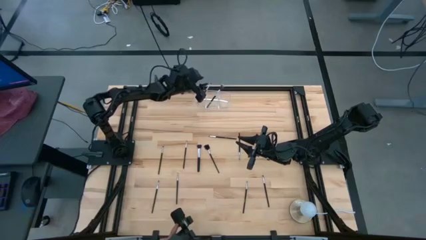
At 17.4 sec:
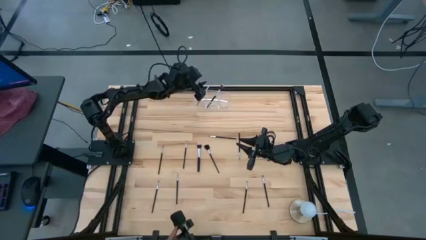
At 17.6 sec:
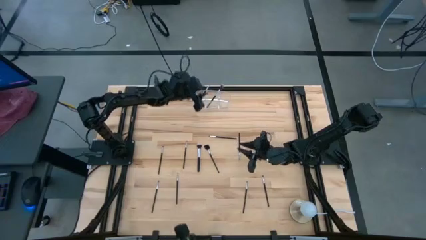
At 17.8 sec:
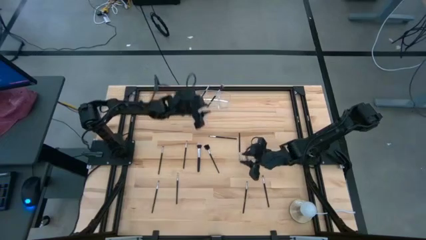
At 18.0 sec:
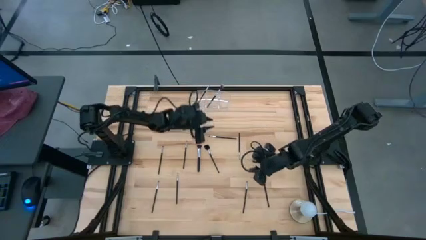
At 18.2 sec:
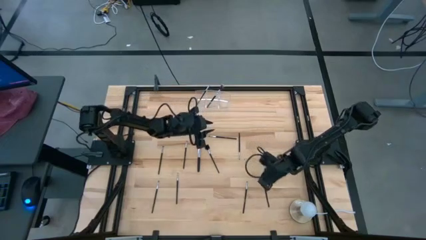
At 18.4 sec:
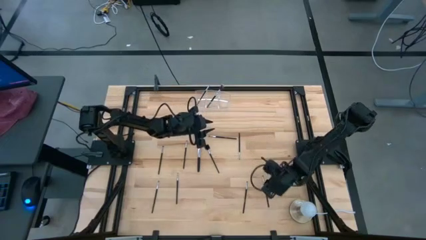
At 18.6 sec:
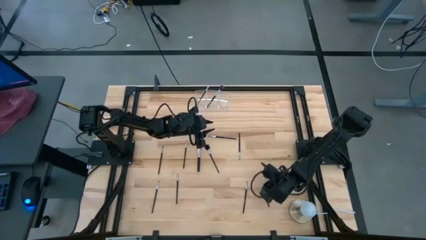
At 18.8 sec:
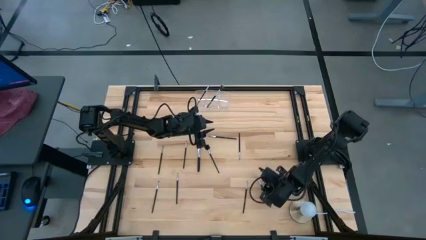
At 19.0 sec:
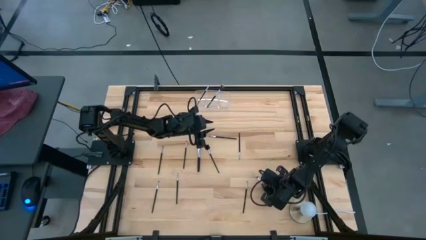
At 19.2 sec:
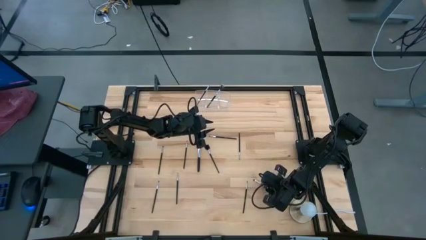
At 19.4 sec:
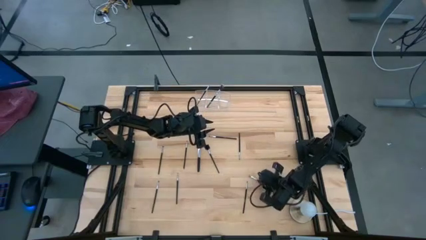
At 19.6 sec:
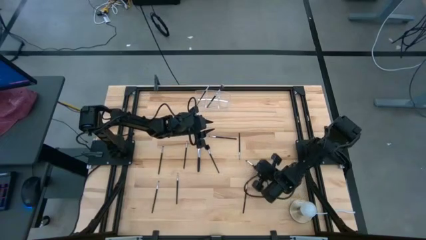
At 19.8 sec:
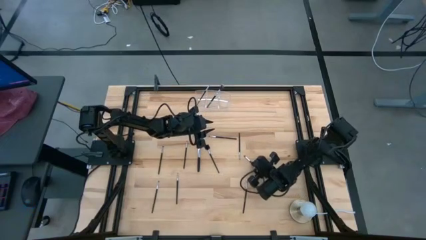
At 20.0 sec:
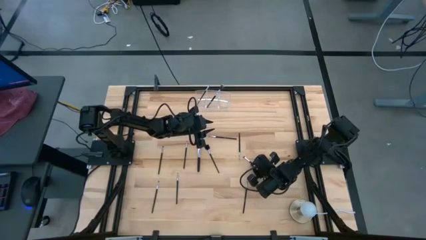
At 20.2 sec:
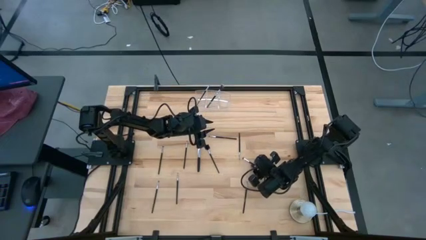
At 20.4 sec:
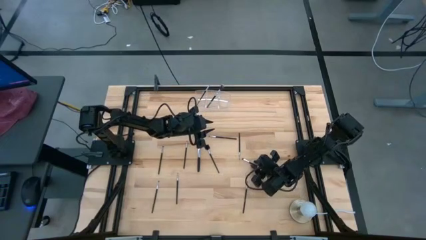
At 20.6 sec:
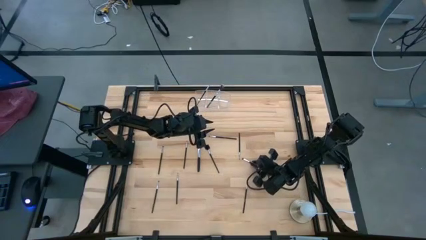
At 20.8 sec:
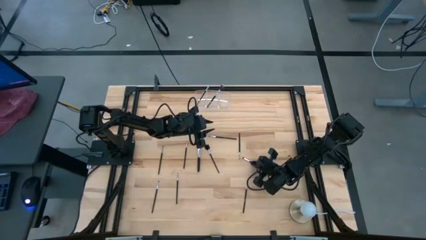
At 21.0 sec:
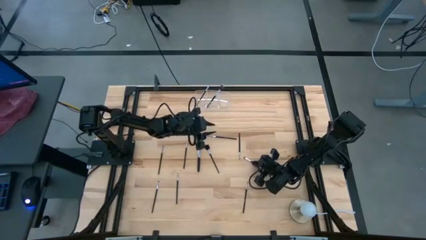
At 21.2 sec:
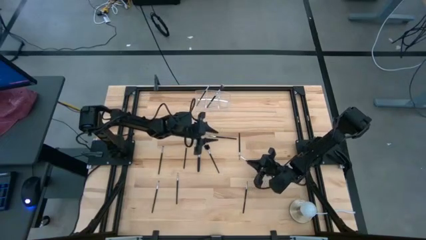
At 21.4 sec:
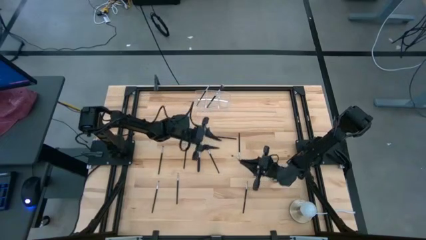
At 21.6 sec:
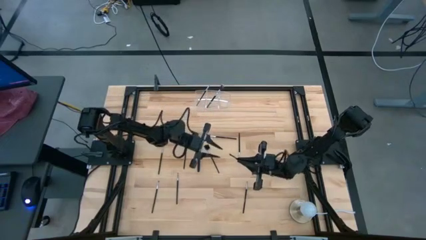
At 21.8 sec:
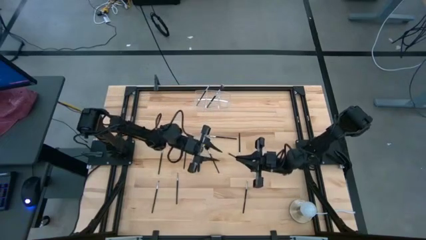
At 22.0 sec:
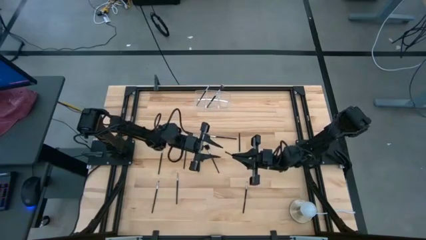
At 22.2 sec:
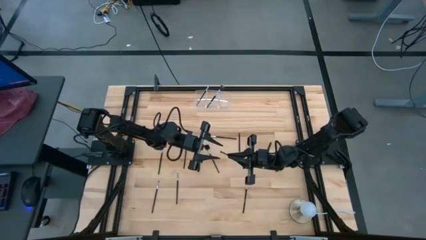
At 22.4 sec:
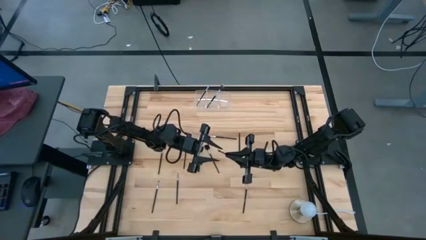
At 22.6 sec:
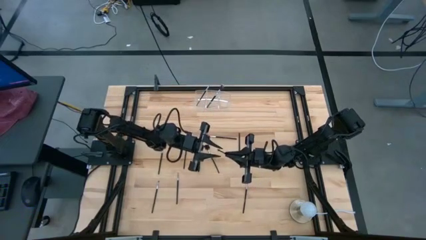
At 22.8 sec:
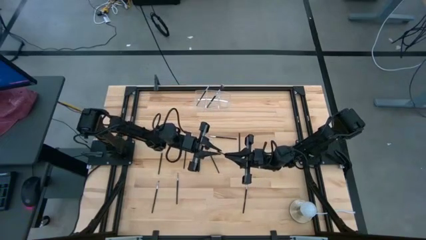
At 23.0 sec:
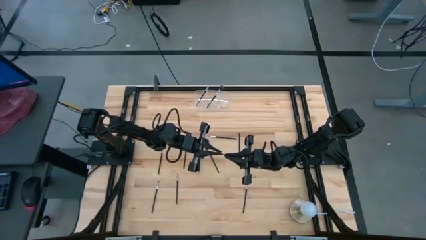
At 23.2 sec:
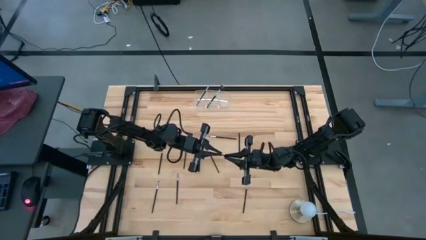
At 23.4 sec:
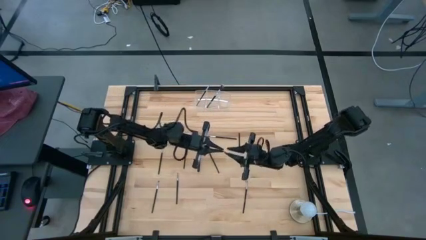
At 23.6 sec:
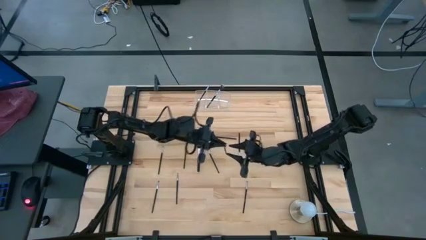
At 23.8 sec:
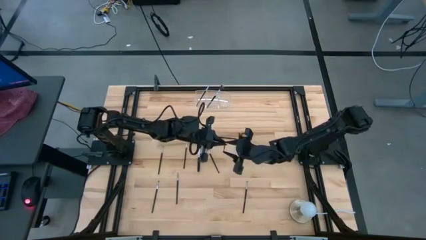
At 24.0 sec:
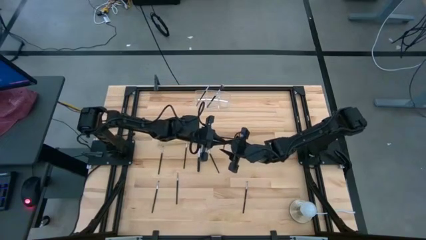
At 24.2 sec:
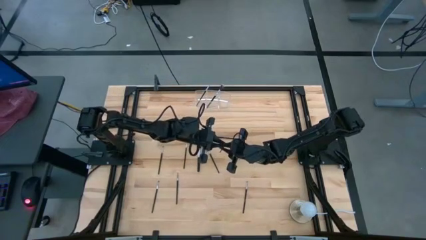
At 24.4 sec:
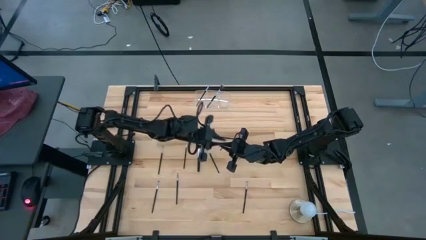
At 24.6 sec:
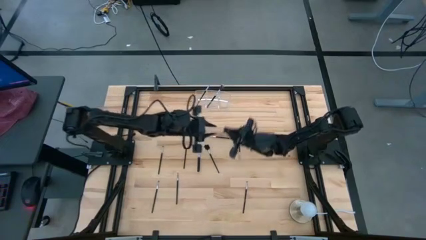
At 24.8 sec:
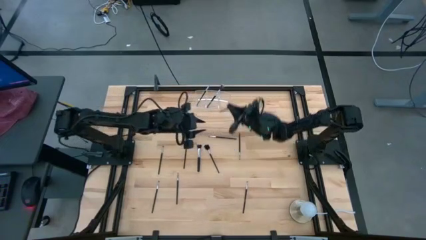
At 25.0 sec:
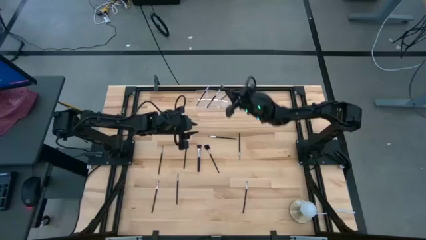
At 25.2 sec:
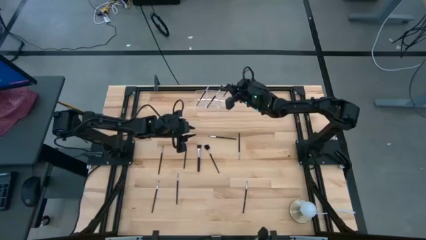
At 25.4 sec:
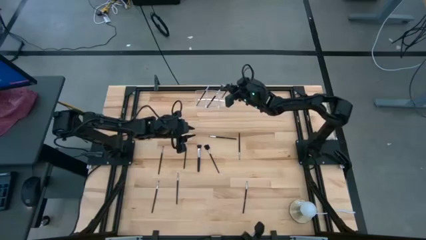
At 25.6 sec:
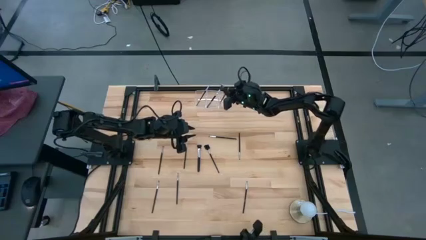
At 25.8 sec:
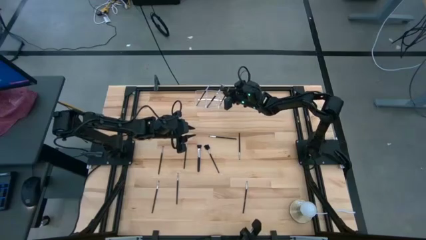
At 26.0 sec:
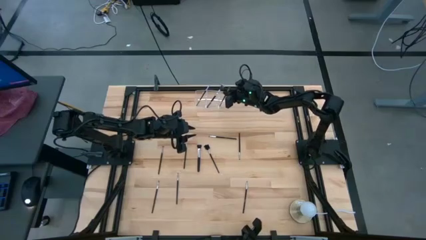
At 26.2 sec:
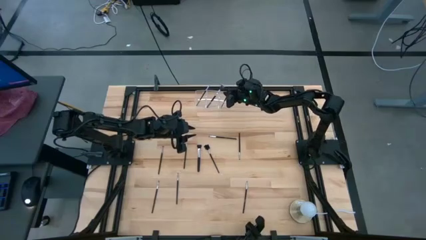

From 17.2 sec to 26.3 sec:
Task: Put items in baskets/containers
Put the black eyeshadow brush into the transparent organizer

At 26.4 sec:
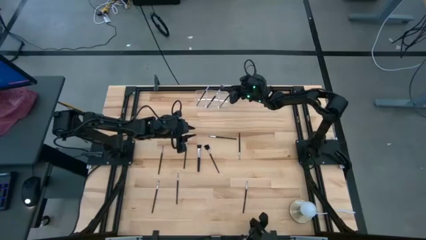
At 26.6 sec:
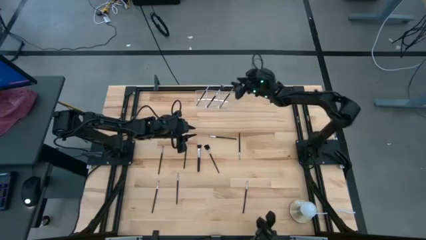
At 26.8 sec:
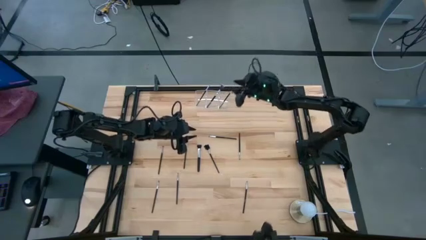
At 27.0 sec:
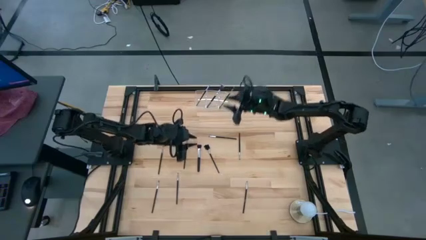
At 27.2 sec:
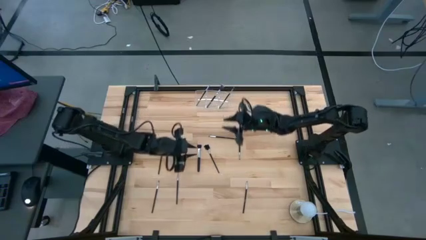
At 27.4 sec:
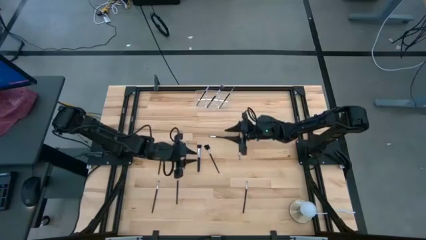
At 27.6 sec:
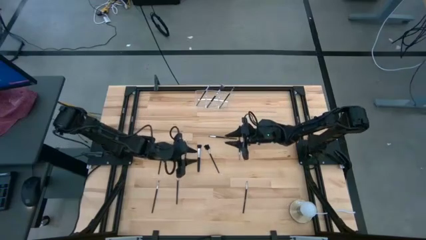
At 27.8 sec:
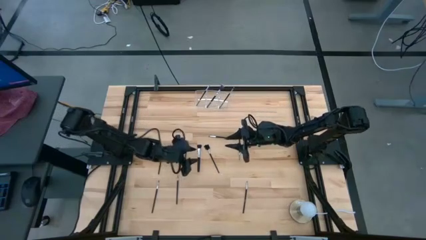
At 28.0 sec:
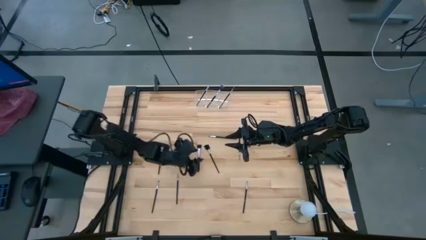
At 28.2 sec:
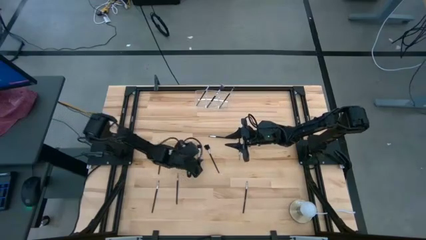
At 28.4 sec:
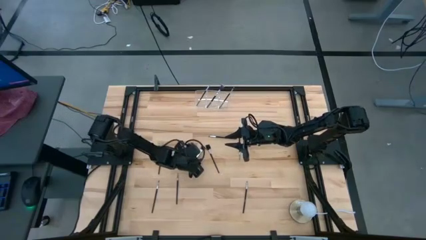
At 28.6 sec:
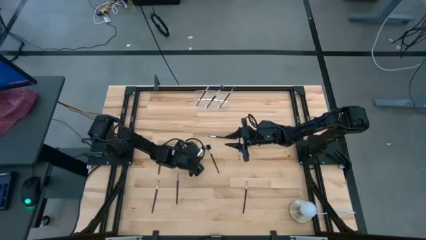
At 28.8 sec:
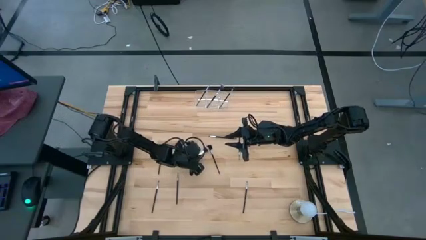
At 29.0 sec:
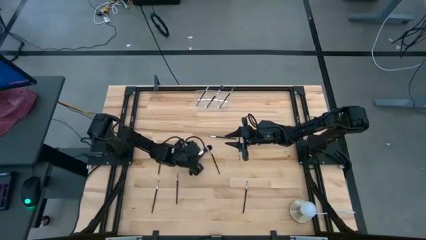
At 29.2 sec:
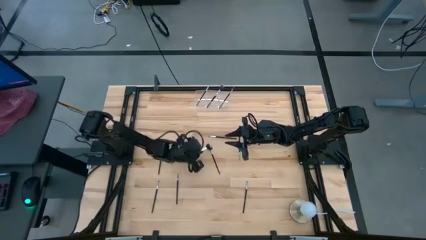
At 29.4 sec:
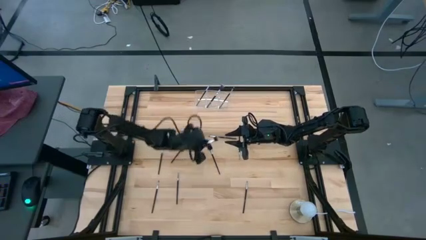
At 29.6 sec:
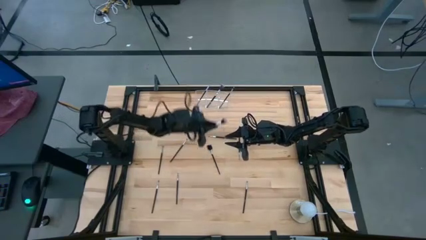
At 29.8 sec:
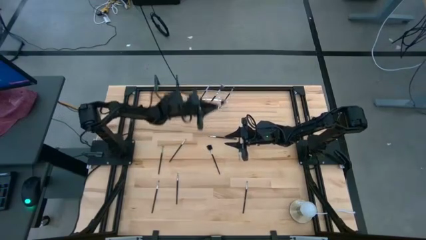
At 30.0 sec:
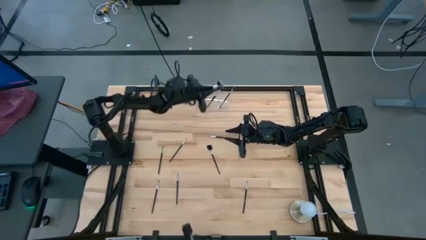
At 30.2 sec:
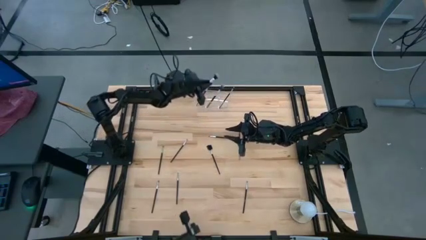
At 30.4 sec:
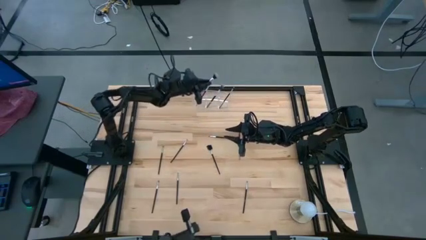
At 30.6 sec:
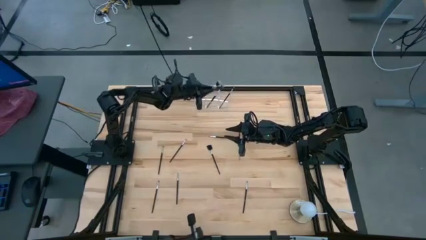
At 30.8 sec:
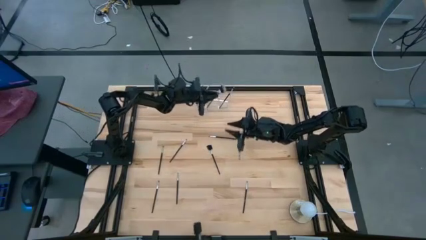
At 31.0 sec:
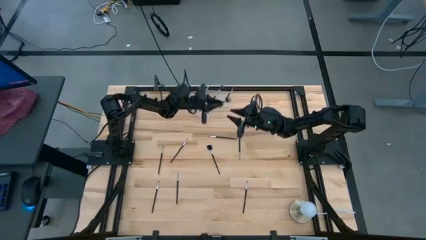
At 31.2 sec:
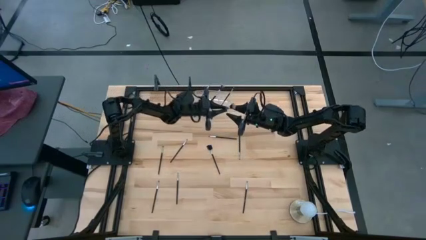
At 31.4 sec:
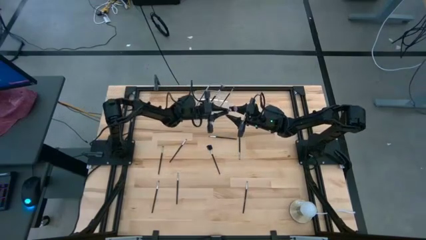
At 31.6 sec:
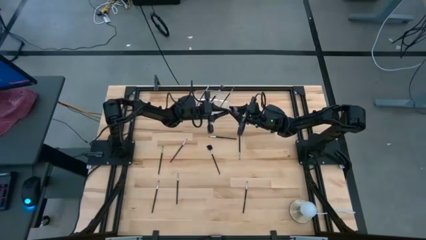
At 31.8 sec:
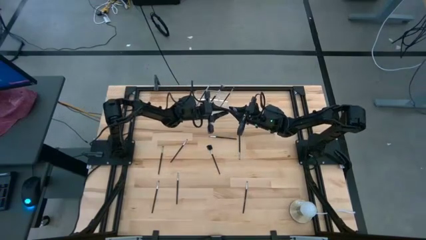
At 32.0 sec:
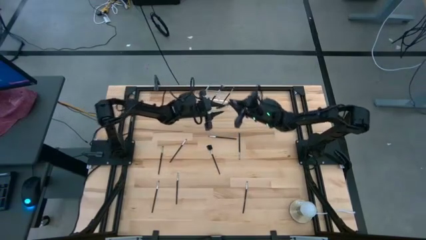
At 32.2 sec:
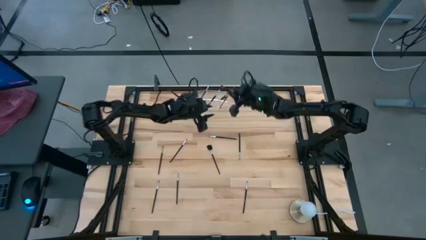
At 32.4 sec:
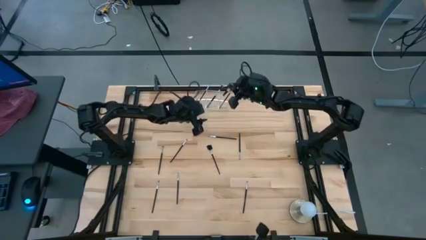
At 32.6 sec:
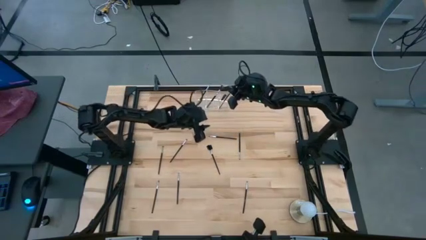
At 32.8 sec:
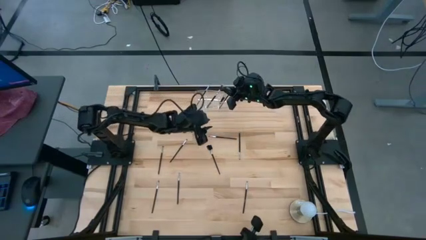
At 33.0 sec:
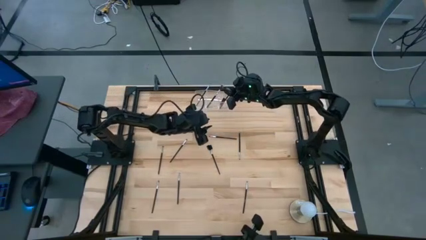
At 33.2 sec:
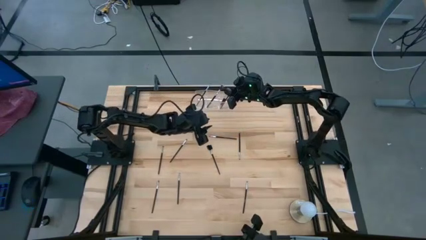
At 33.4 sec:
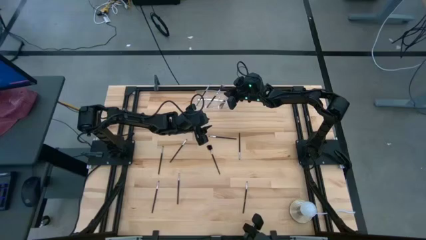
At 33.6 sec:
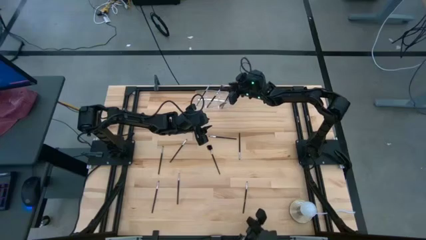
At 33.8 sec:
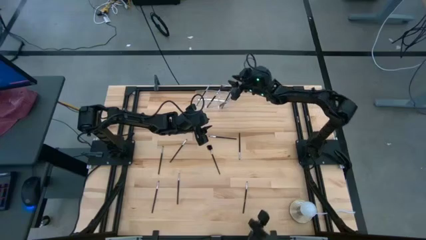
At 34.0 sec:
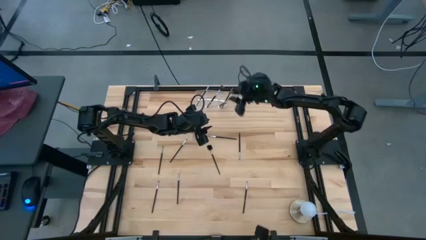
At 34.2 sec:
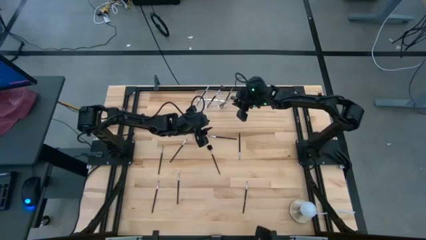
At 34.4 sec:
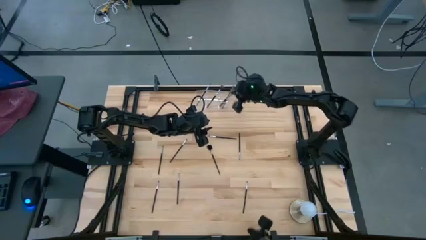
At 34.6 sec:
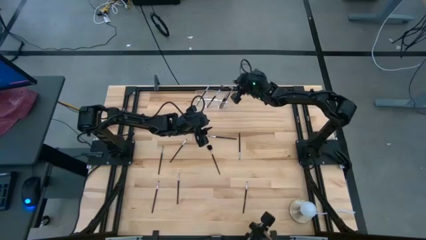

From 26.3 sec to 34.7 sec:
Put the black blush brush into the transparent organizer
